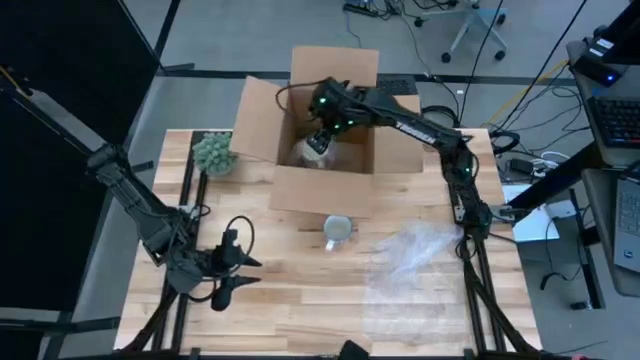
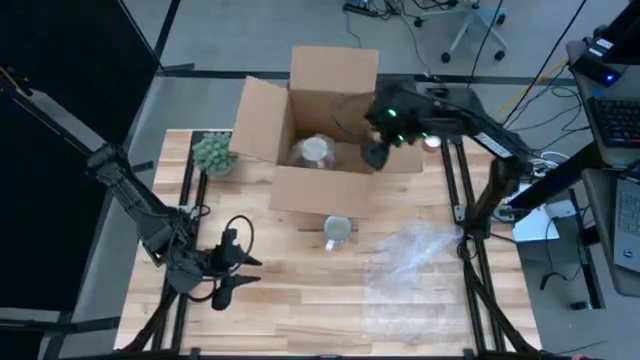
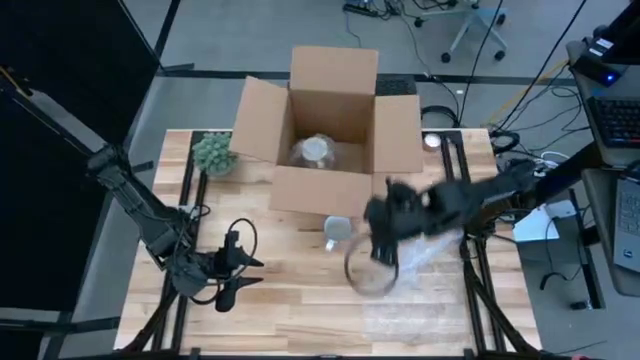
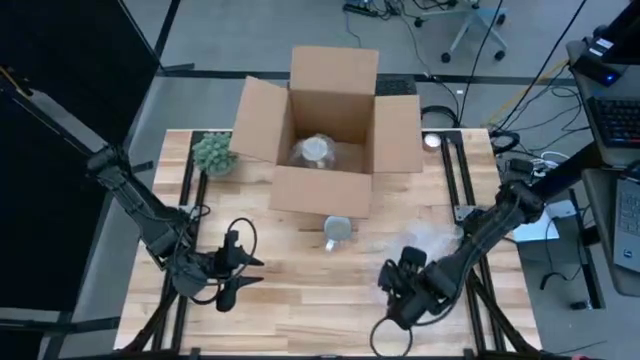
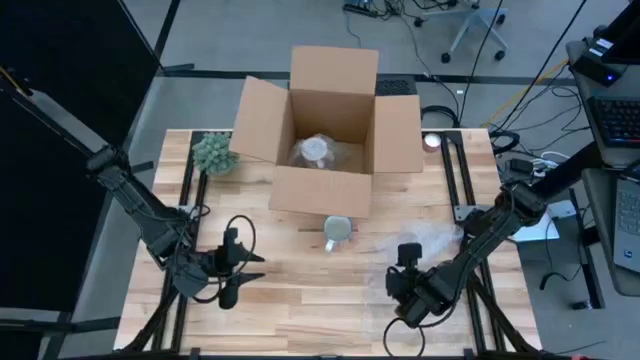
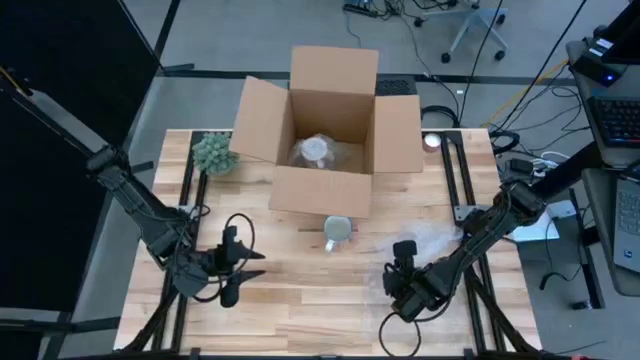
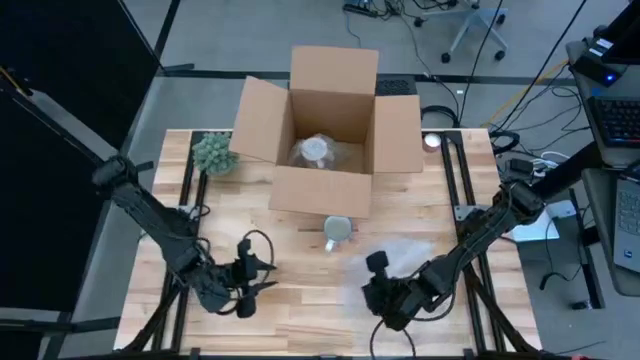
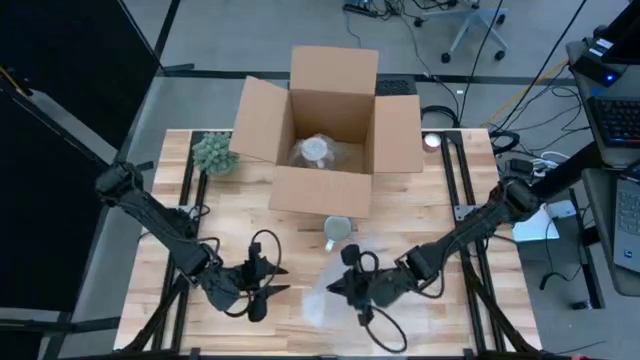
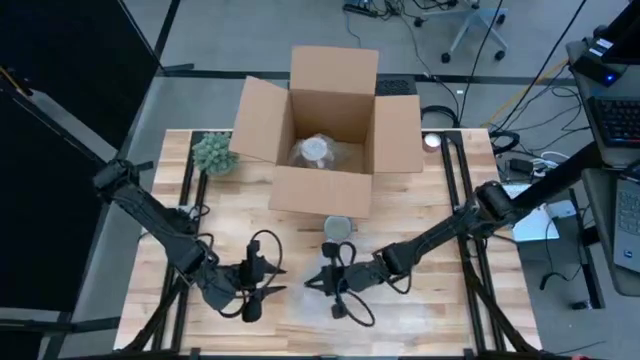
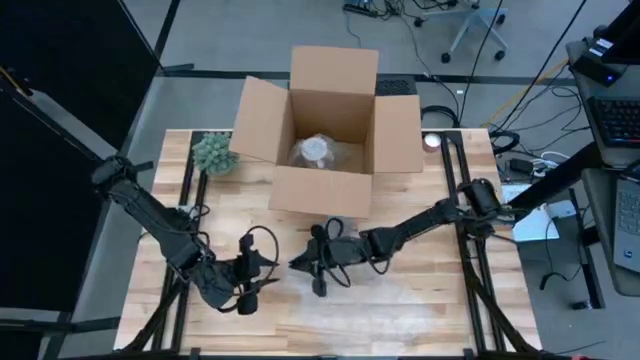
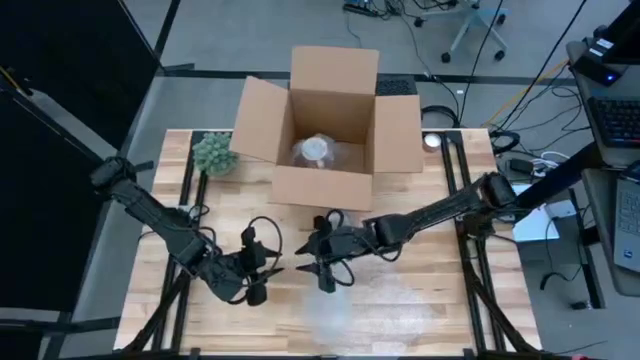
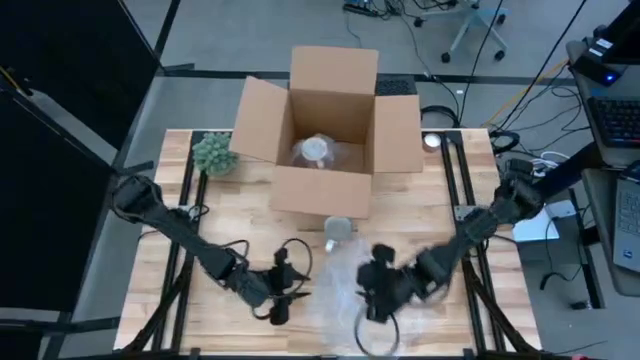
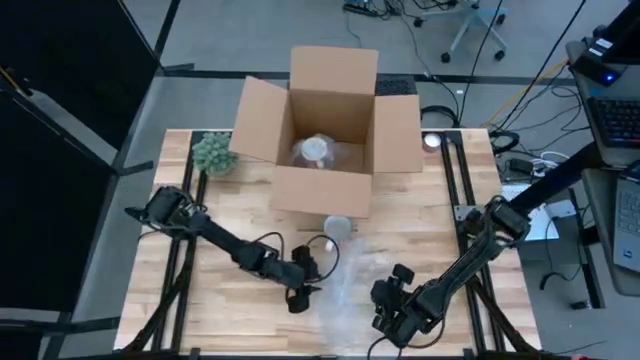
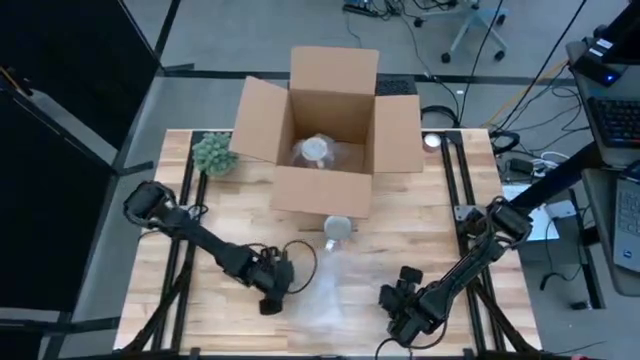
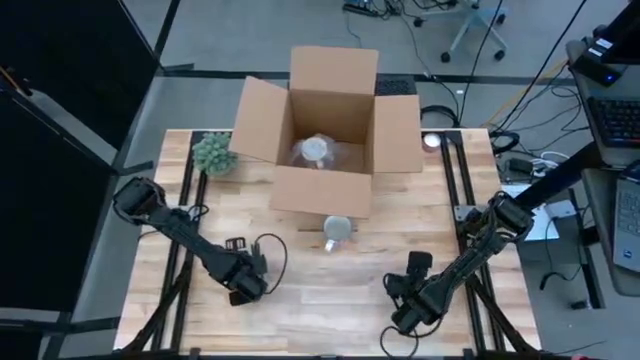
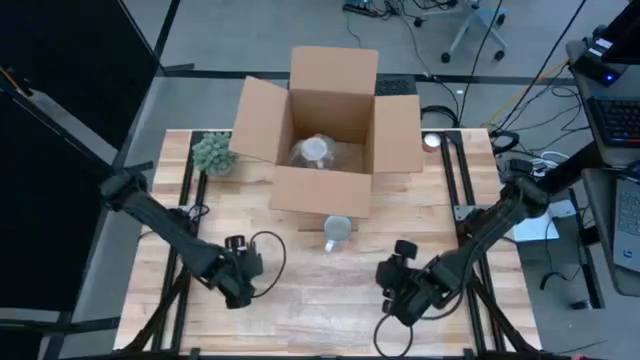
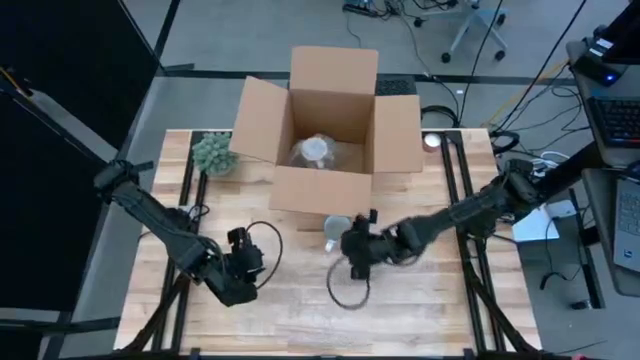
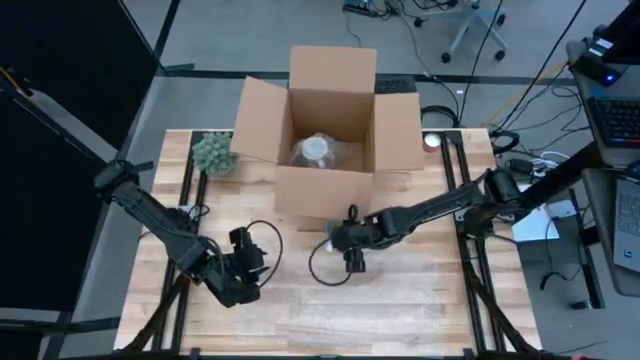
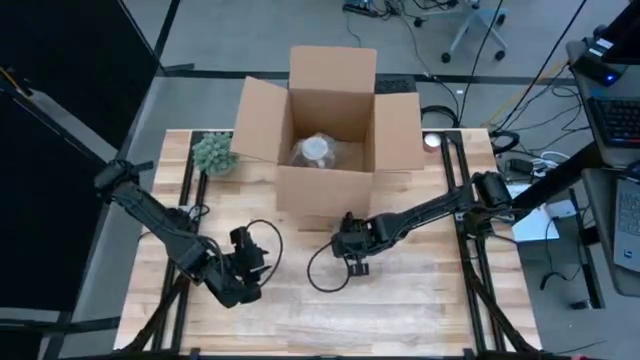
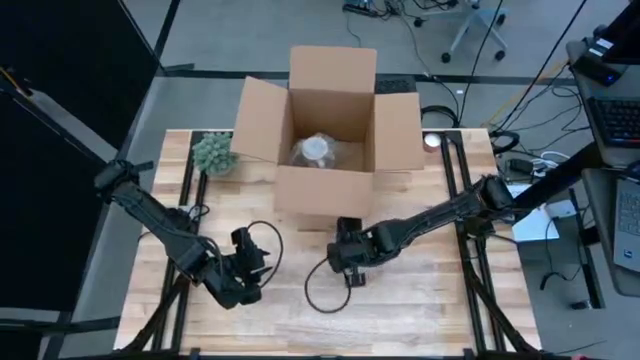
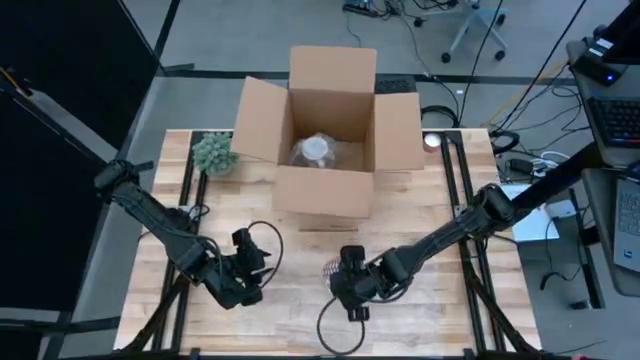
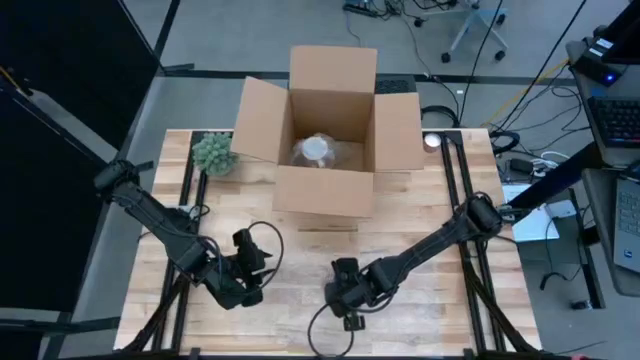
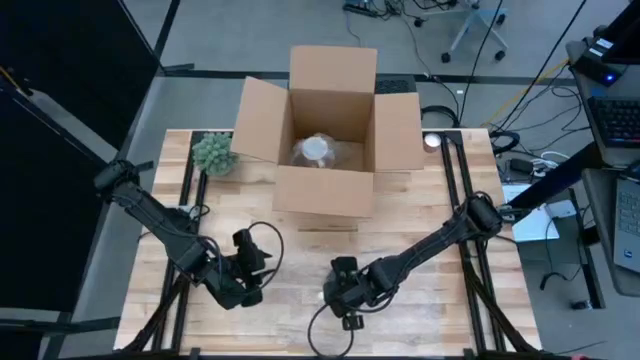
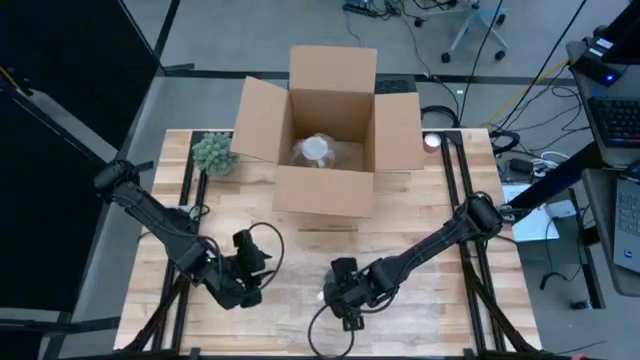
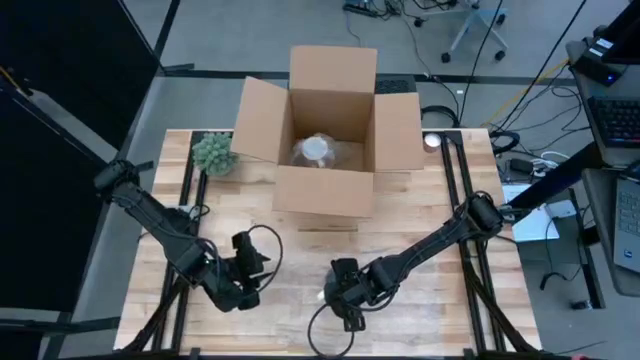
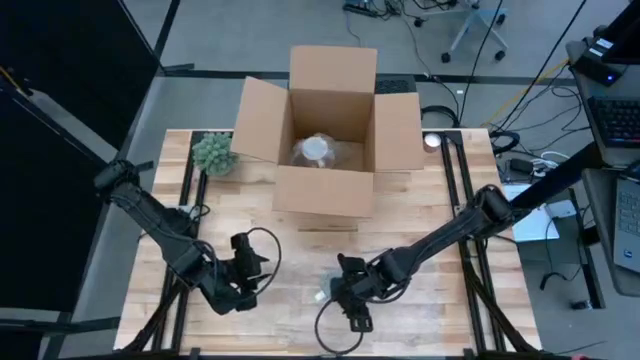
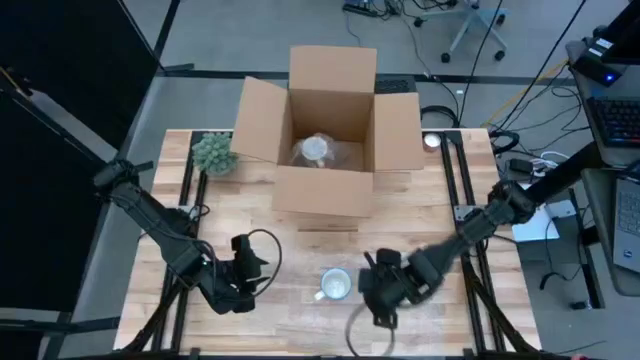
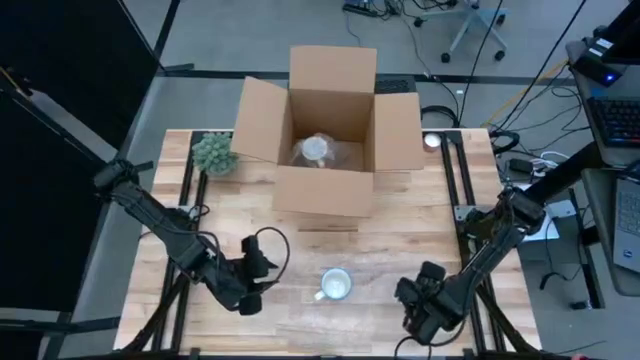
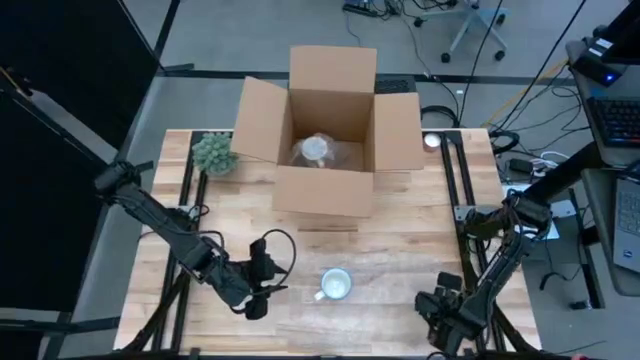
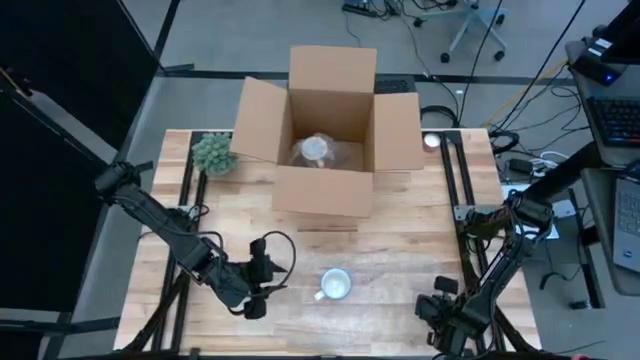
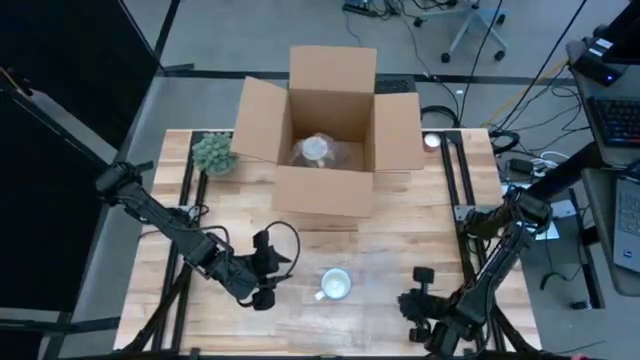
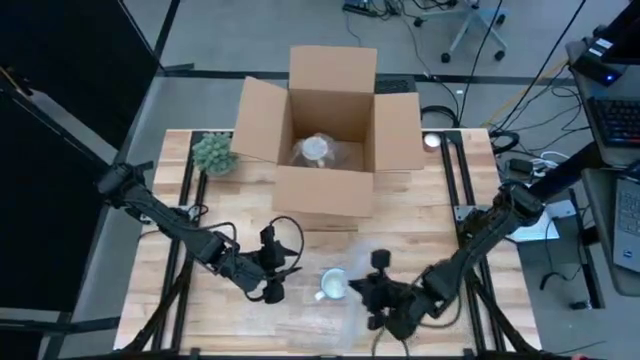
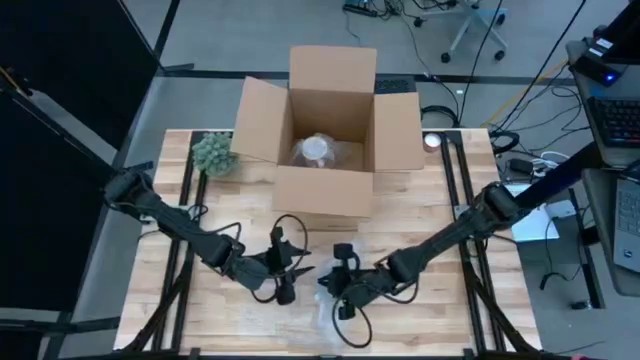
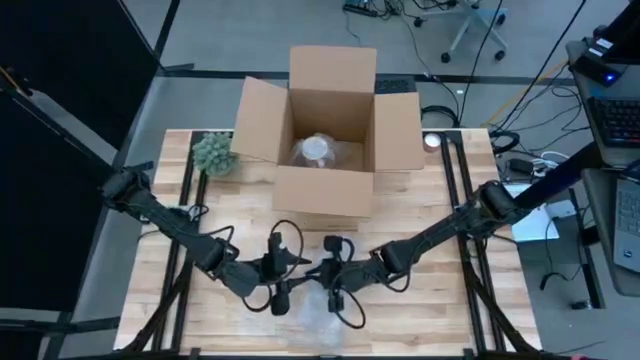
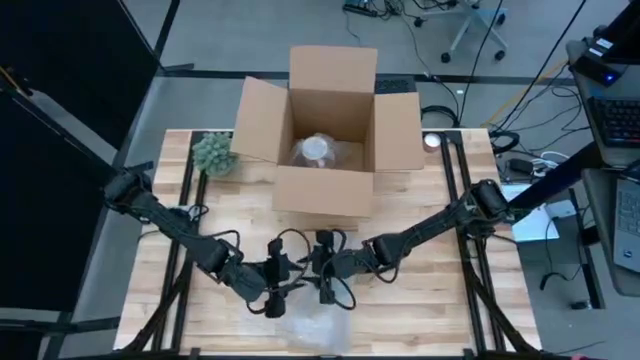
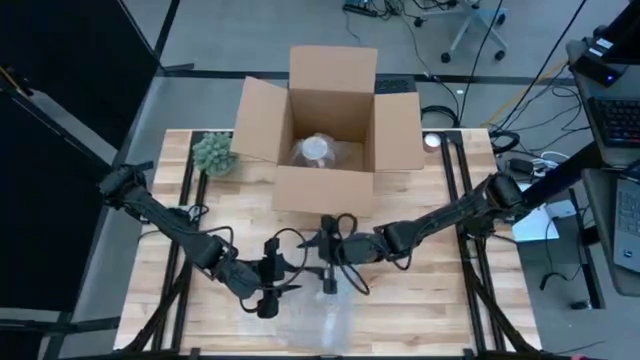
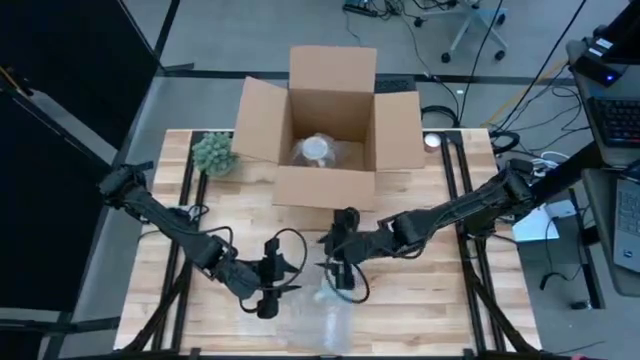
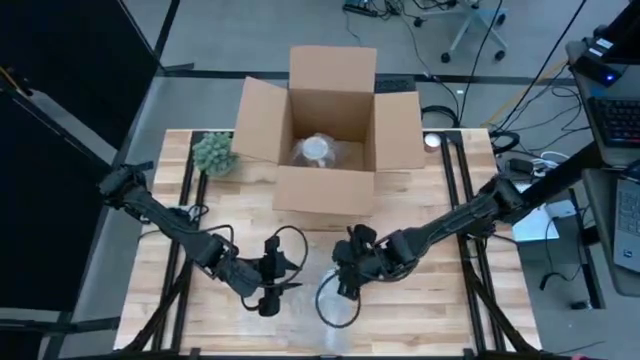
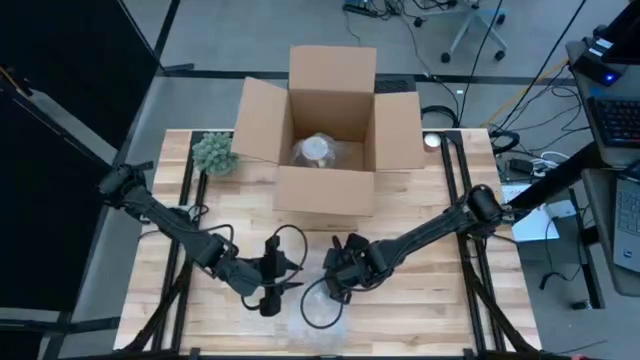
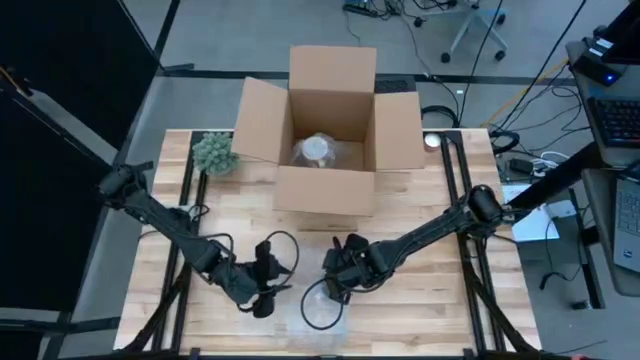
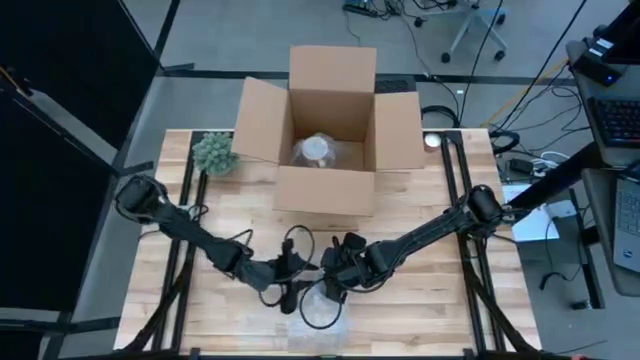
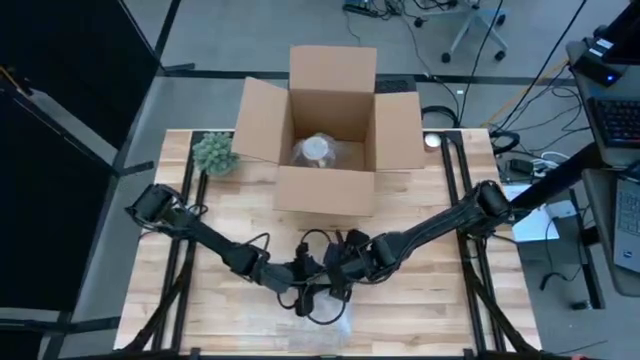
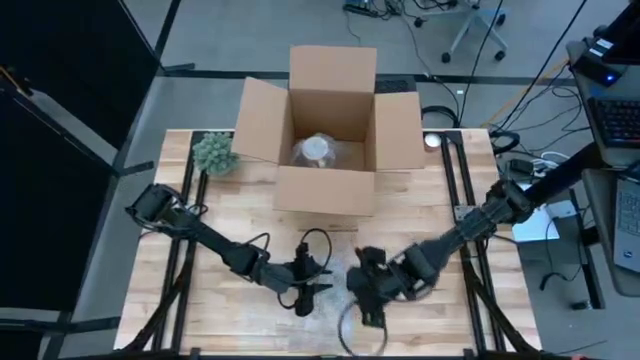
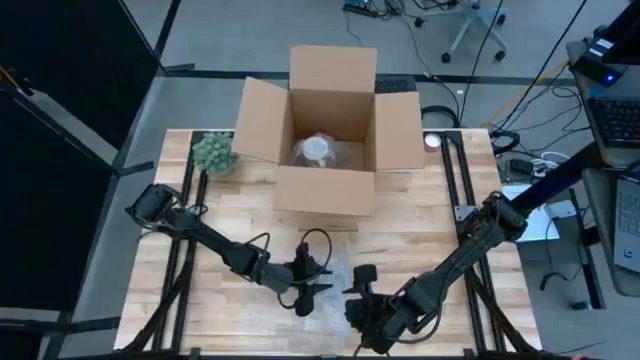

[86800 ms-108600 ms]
Task: wrap mug
Wrap the red mug with bubble wrap
